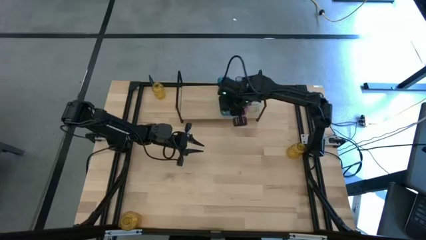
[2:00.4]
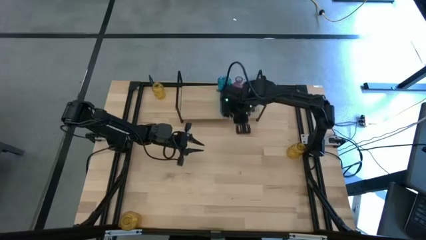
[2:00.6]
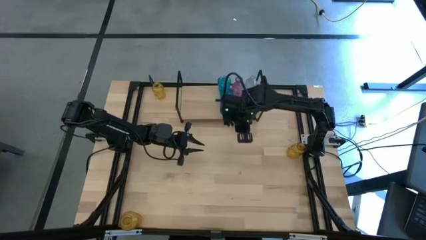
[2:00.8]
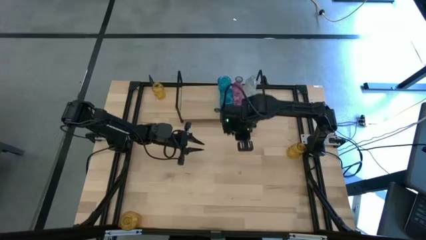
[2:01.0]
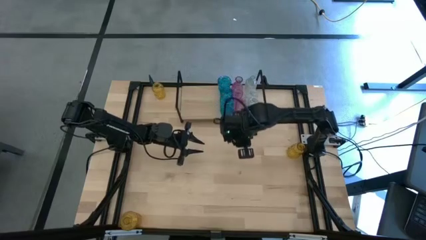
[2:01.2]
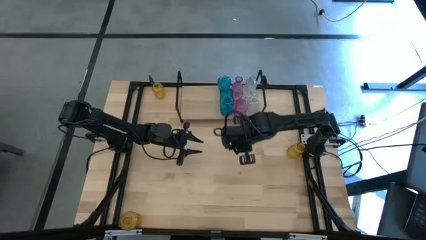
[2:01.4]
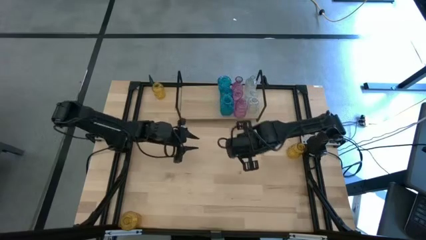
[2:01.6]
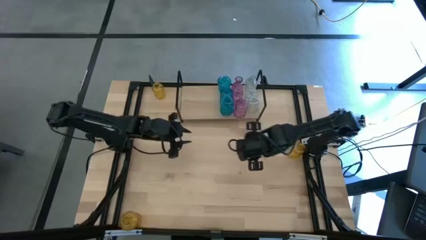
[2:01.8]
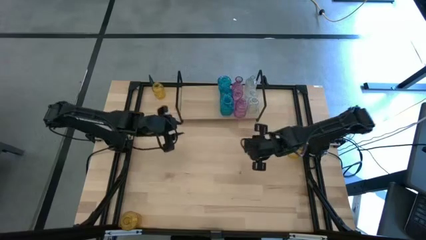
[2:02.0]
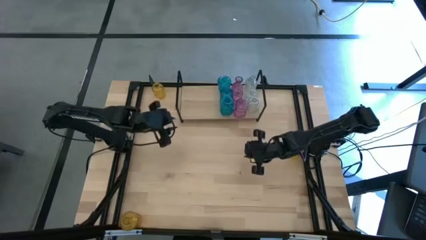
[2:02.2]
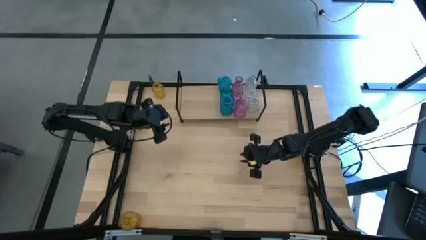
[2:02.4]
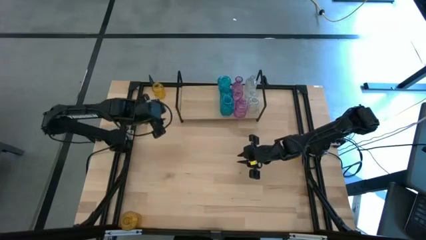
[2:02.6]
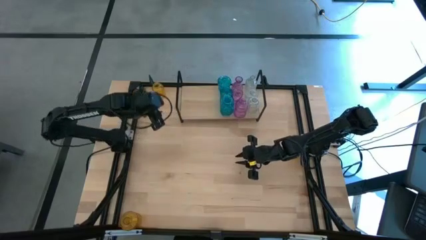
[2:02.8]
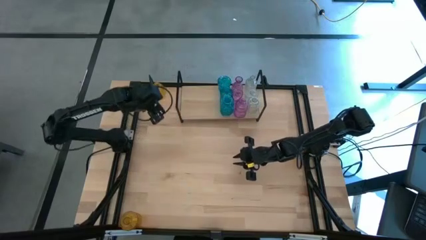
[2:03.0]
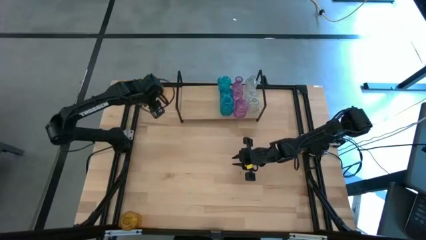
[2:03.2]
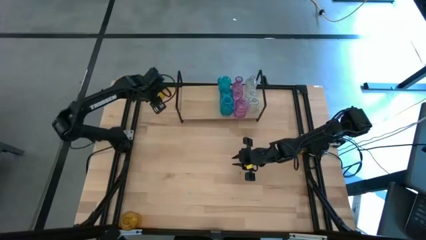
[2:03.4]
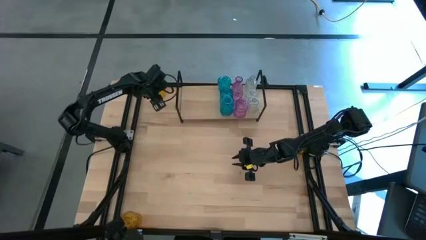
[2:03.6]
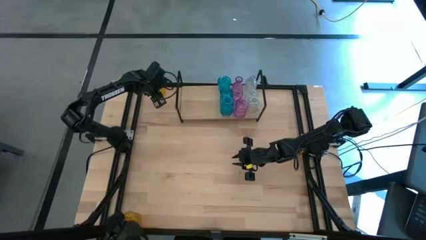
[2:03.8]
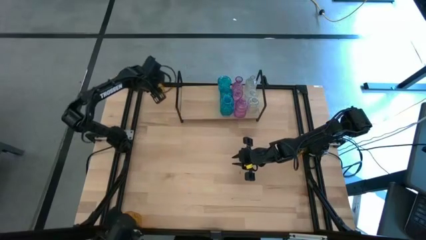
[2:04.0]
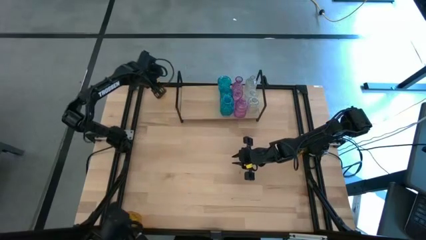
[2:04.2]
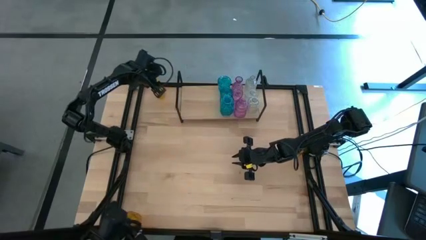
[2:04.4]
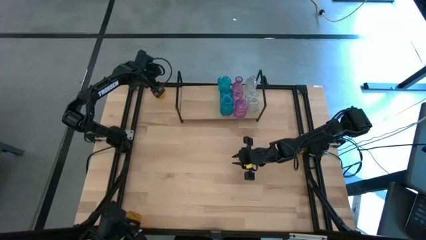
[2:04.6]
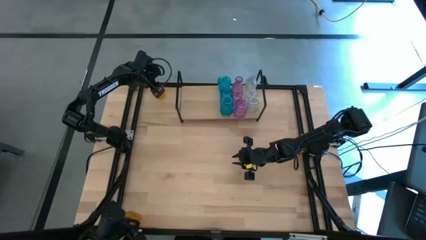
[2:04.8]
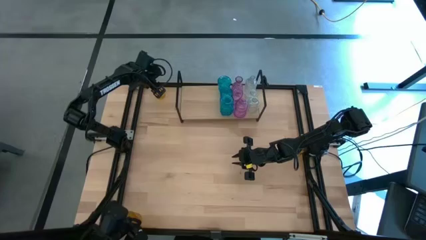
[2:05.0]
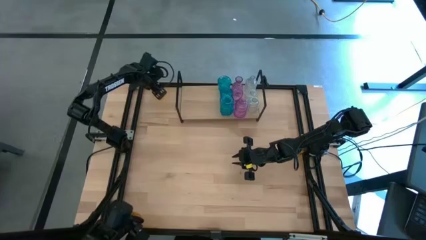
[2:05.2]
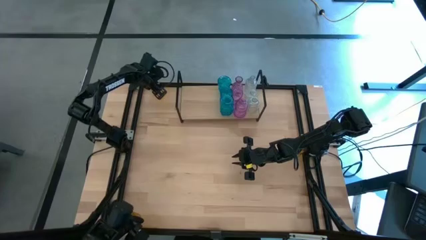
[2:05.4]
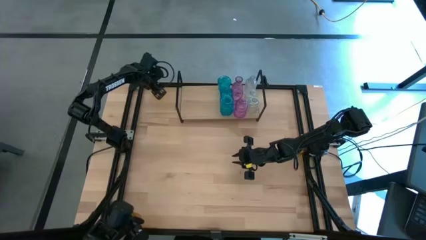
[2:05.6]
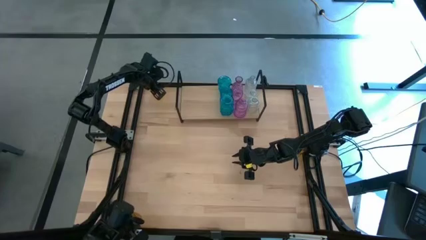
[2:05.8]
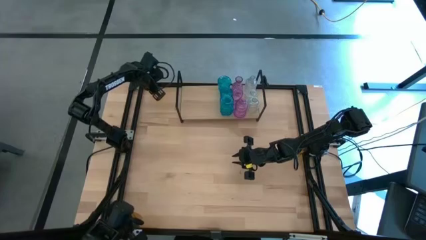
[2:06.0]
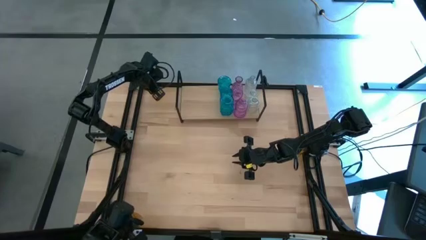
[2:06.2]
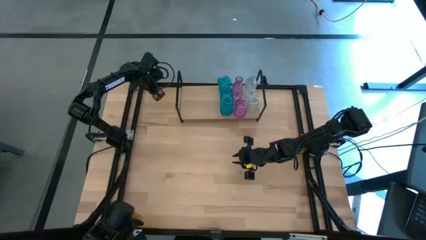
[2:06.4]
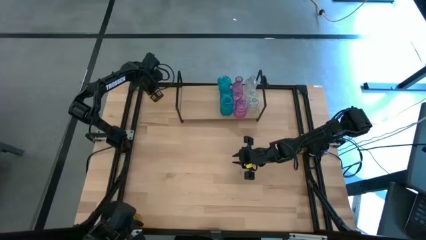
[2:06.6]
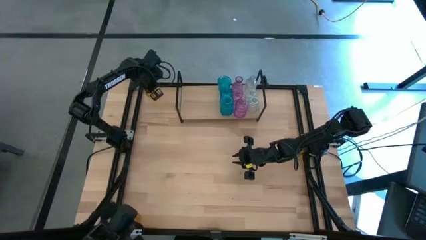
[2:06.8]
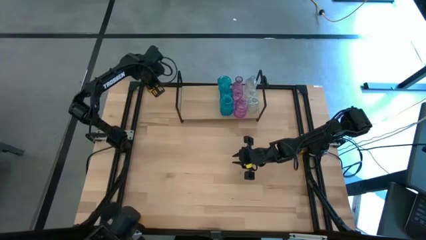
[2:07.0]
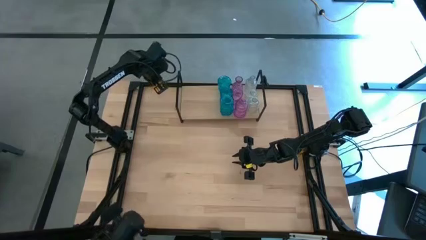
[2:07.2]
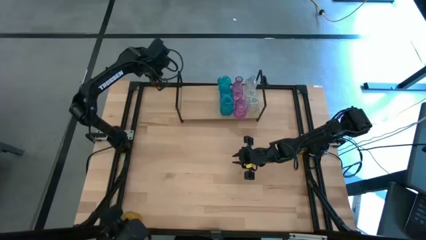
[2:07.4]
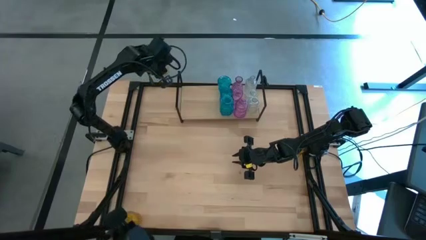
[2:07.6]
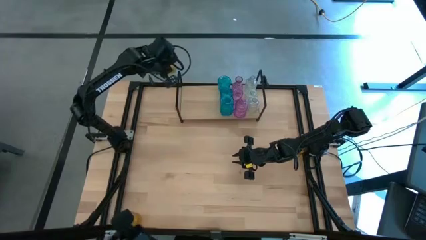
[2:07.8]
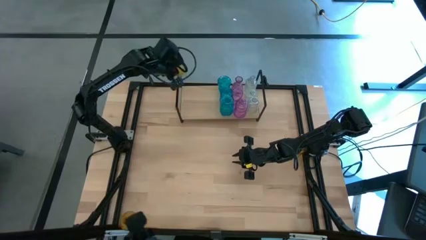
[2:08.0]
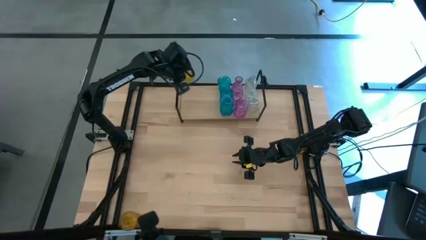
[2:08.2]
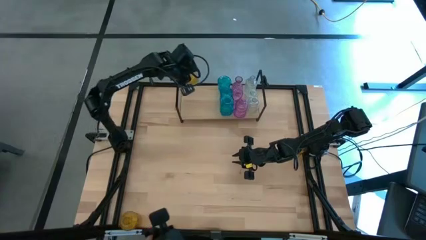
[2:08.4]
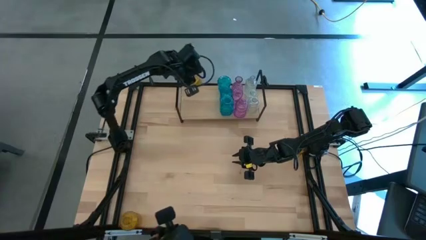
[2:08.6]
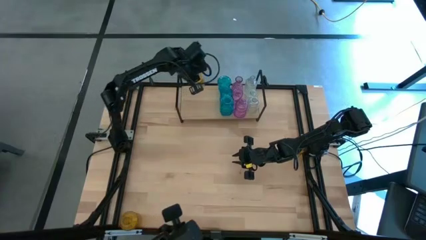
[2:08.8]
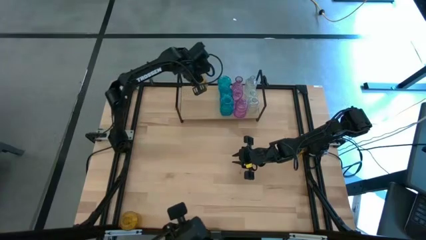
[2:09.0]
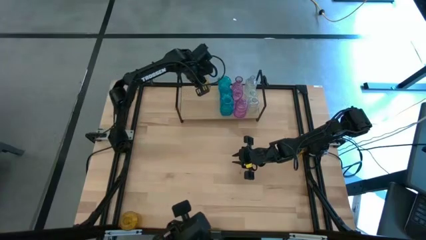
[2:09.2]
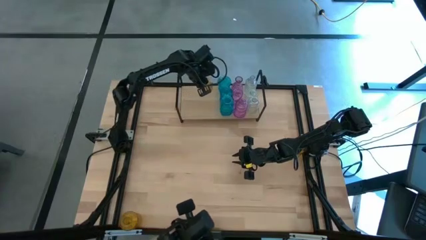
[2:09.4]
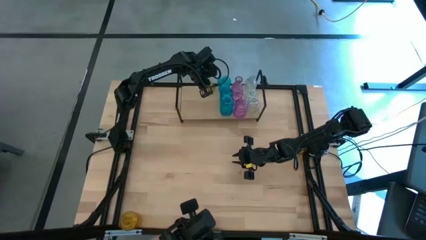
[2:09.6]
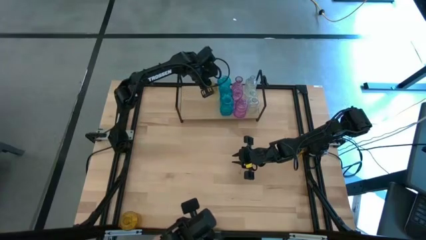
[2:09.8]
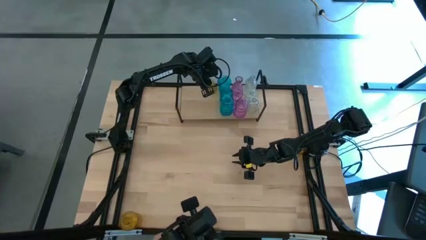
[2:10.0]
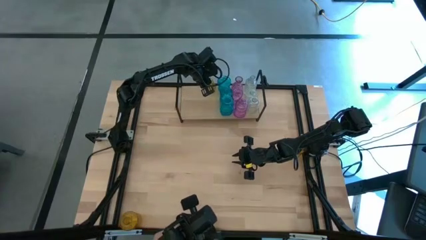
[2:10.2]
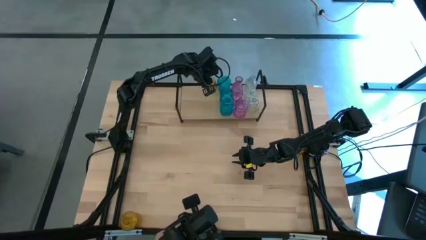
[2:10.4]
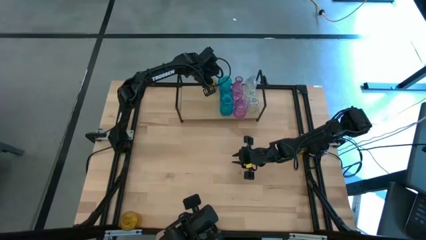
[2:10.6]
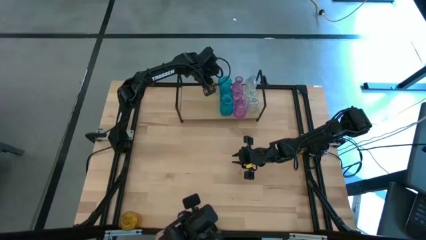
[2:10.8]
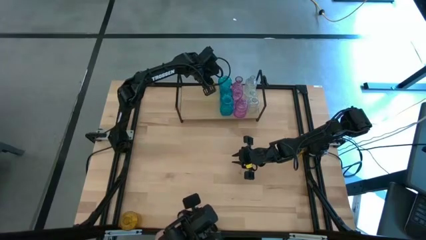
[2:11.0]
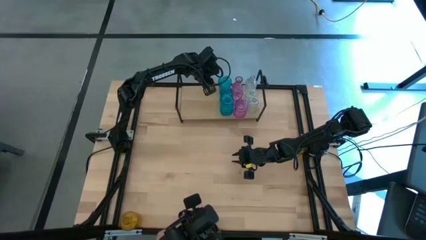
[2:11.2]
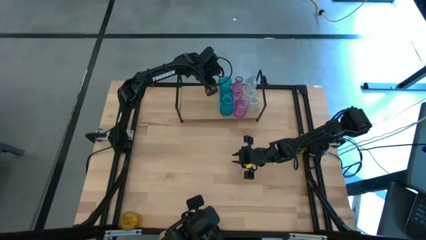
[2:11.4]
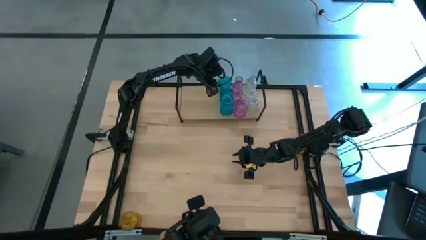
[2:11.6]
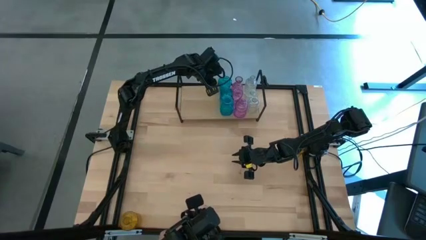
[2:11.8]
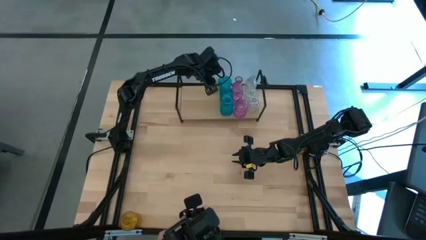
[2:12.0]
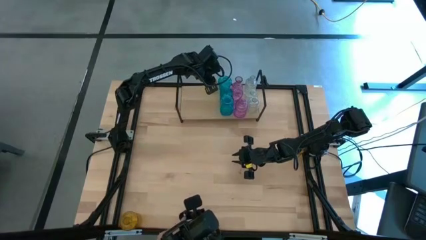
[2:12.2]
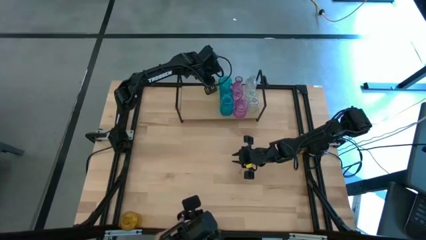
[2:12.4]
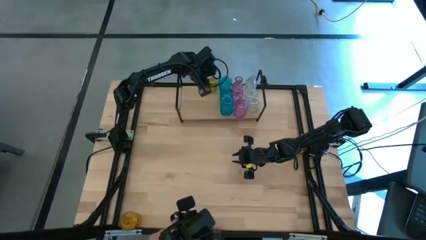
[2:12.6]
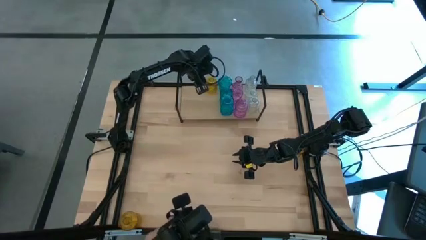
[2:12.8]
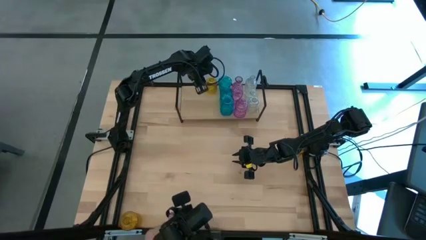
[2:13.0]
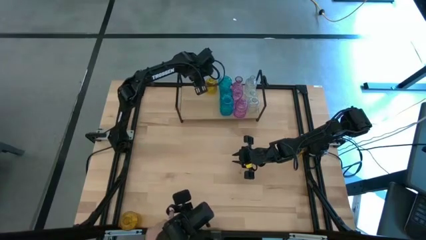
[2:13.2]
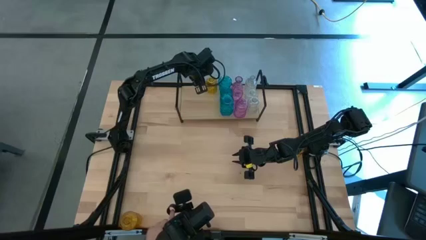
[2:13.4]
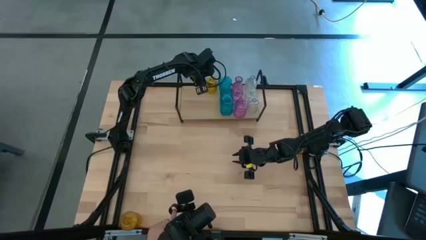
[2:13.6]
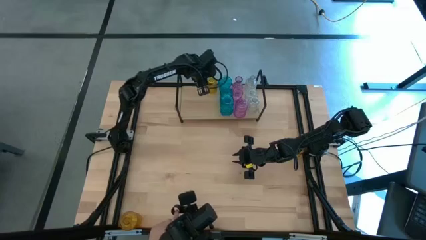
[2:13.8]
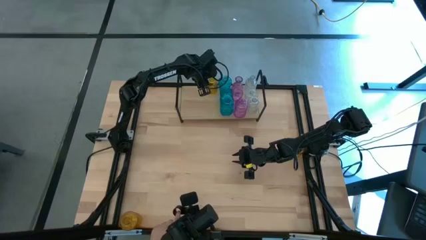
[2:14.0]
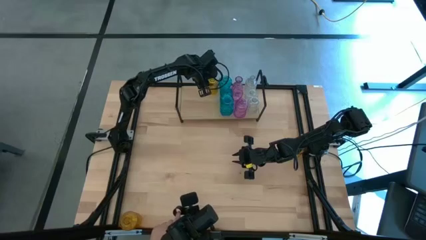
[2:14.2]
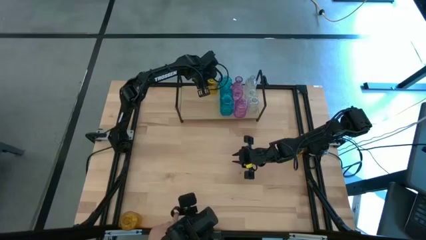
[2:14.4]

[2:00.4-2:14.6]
Task: sort vases onto shelf
Put the top left yellow vase to the left side of the top blue vase on the shelf

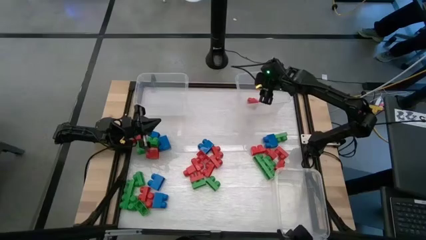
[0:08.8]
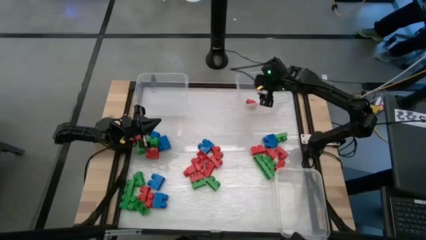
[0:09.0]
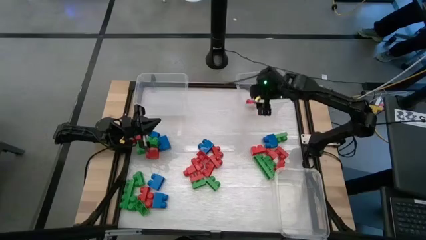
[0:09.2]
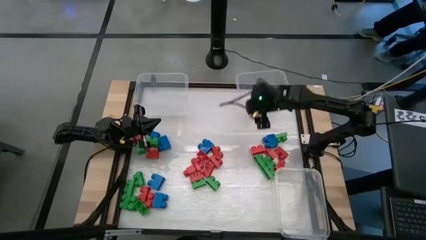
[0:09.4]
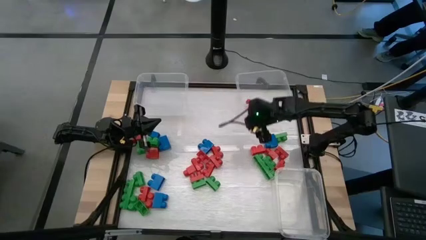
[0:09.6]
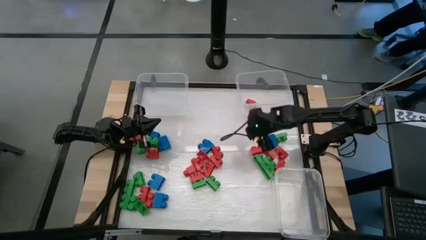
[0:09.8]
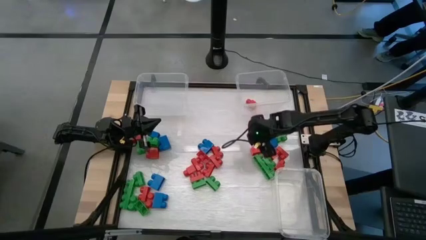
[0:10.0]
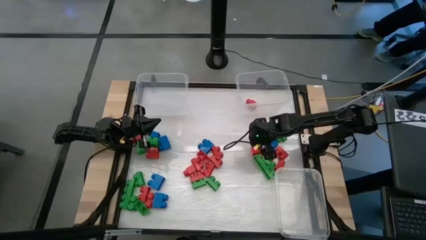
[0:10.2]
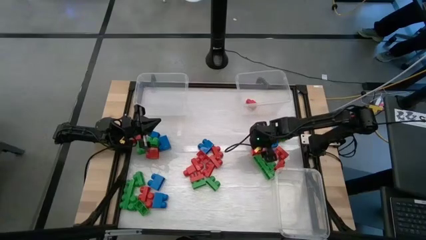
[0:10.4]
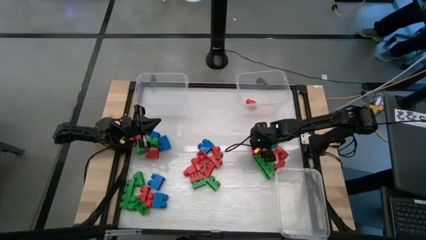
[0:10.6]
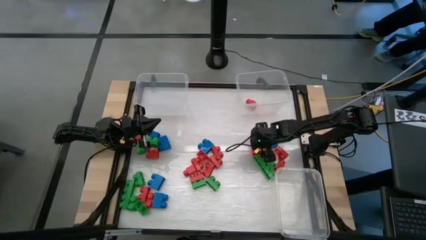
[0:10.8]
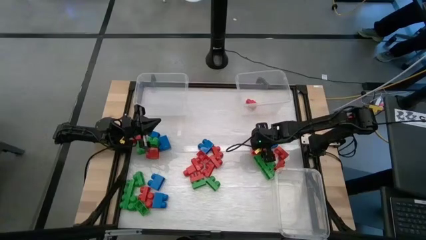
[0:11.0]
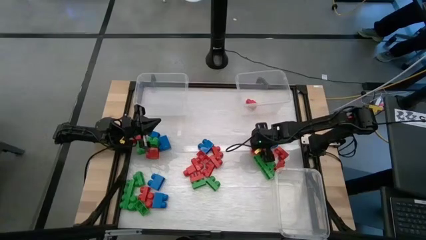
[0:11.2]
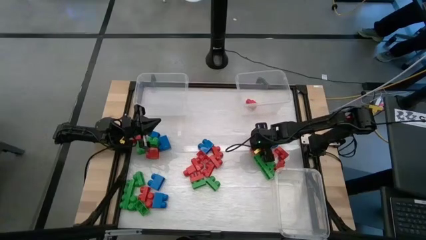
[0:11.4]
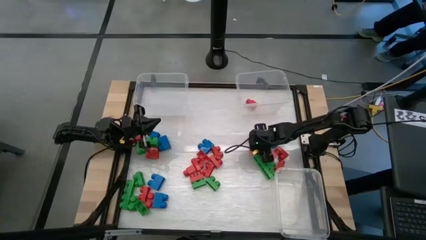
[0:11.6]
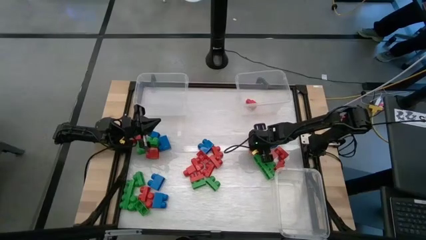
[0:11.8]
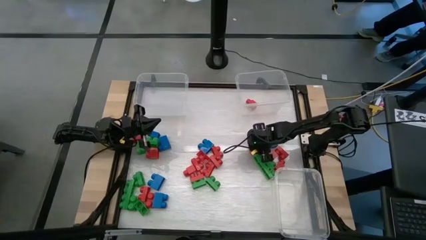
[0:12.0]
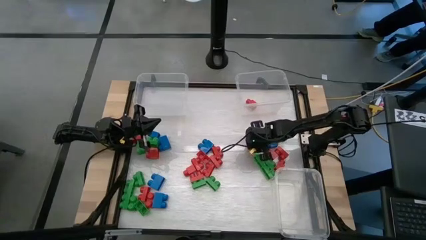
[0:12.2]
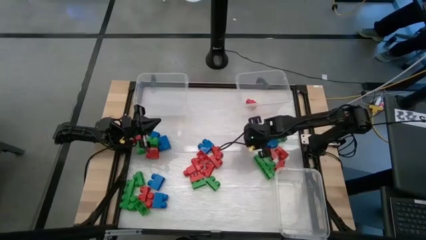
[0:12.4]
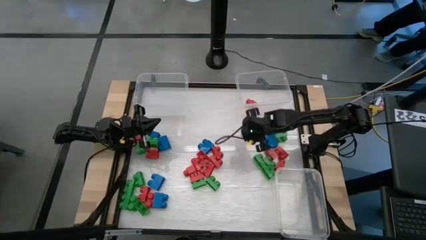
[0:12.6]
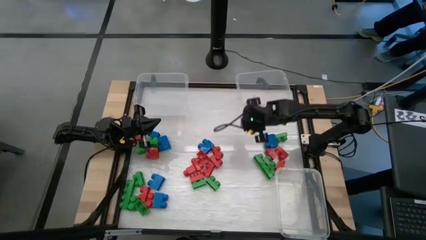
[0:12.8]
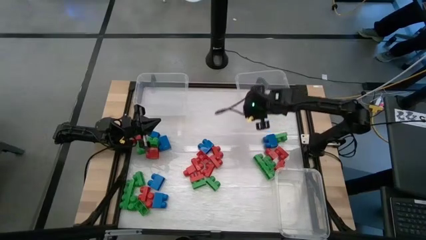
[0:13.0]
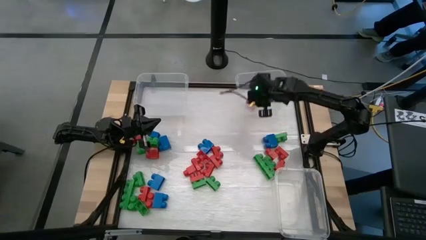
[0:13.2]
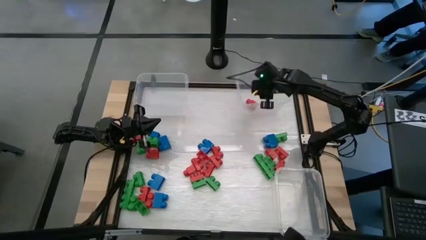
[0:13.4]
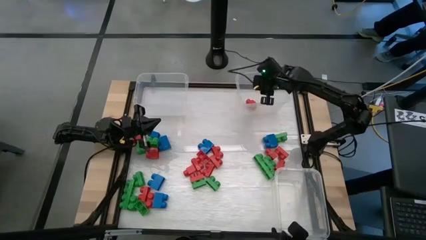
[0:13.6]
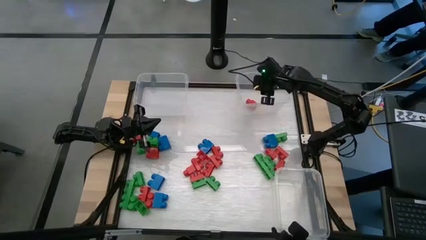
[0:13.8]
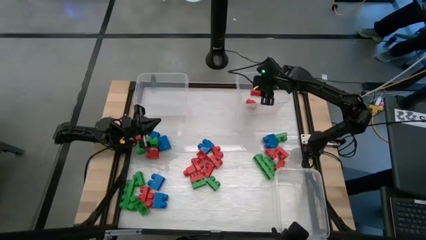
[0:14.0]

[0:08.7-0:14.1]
Task: Sort blocks
Put the red game piece into the top right transparent bin
